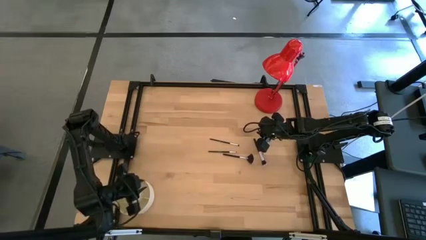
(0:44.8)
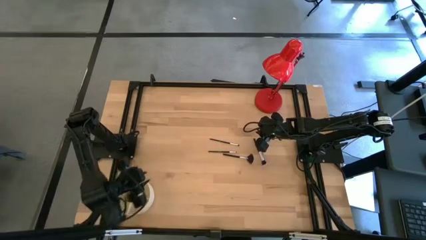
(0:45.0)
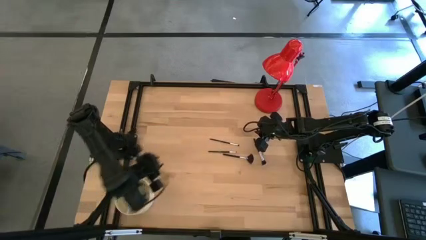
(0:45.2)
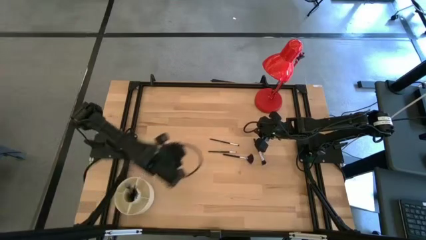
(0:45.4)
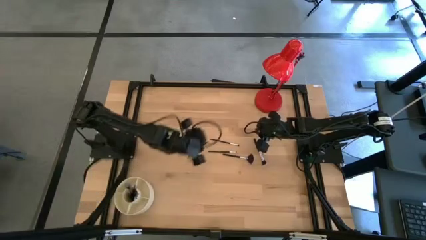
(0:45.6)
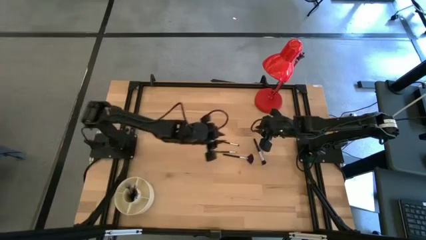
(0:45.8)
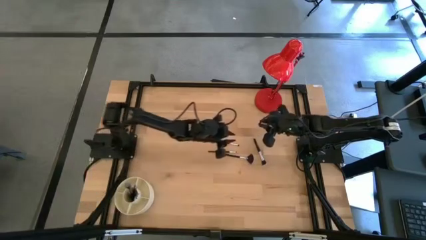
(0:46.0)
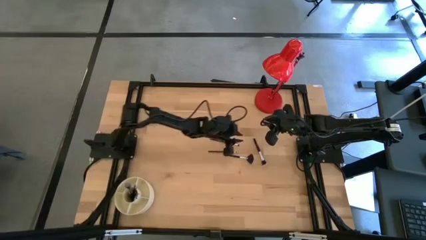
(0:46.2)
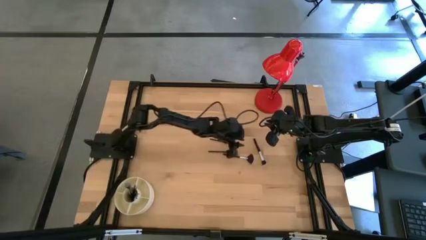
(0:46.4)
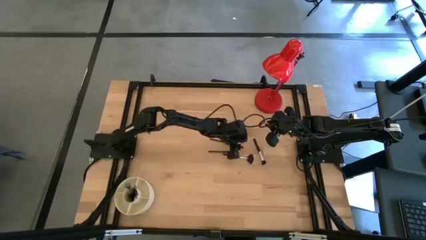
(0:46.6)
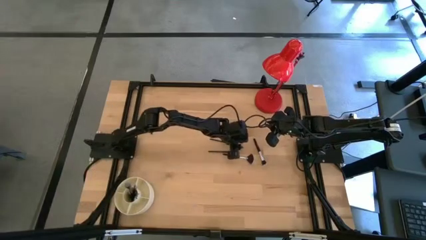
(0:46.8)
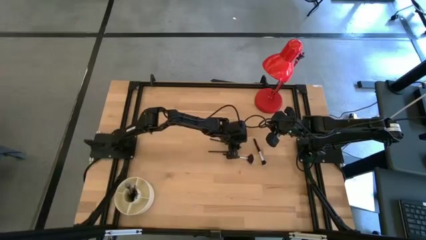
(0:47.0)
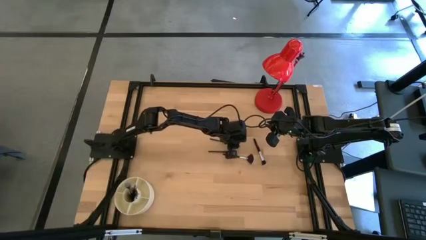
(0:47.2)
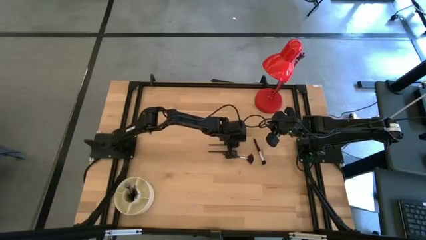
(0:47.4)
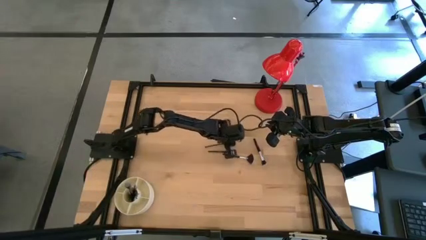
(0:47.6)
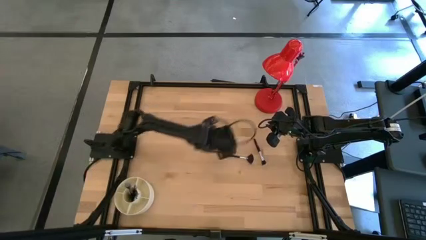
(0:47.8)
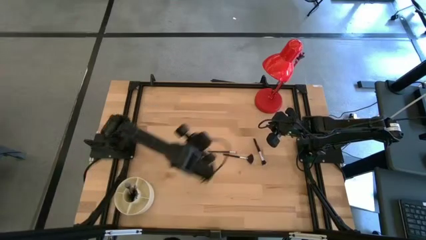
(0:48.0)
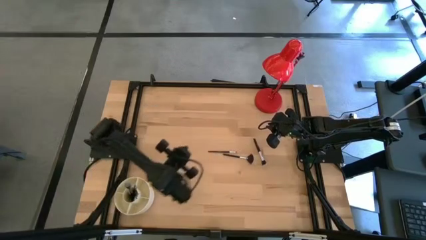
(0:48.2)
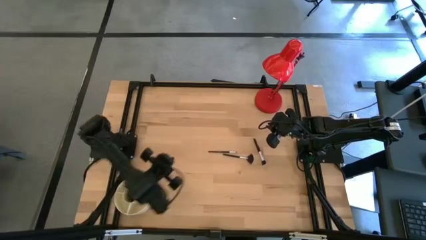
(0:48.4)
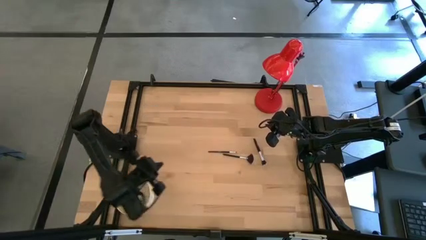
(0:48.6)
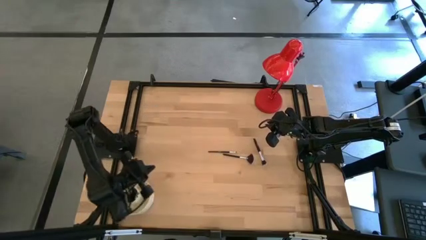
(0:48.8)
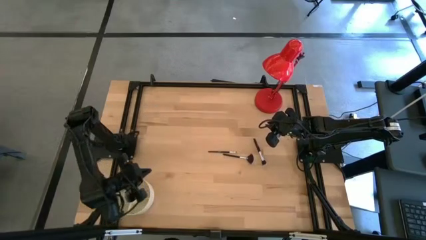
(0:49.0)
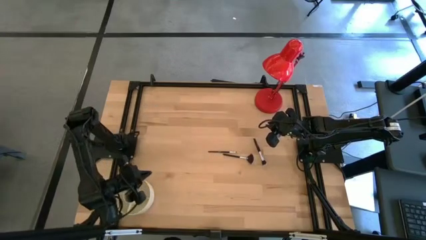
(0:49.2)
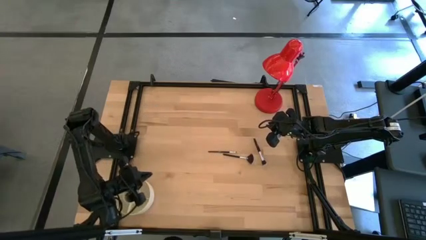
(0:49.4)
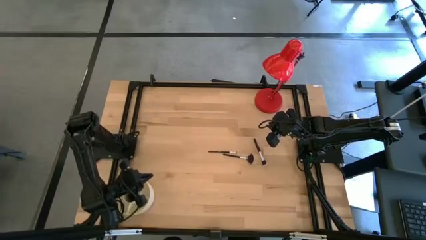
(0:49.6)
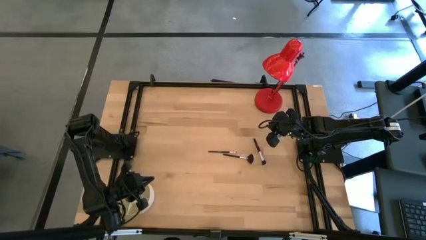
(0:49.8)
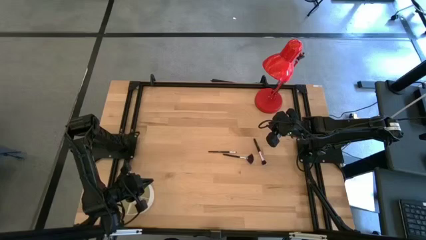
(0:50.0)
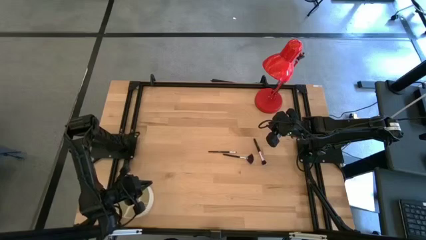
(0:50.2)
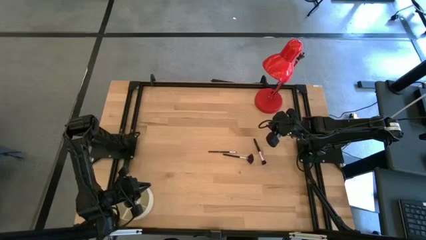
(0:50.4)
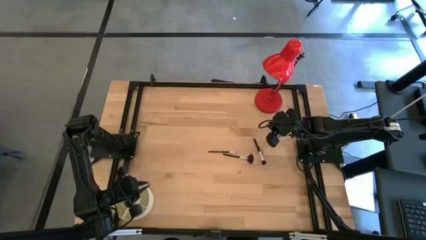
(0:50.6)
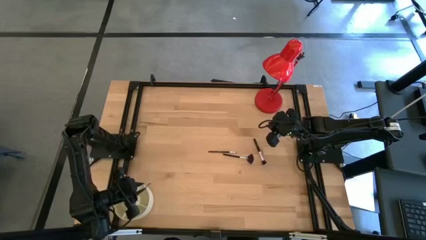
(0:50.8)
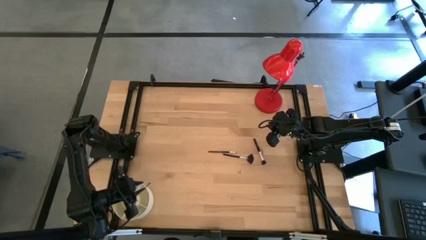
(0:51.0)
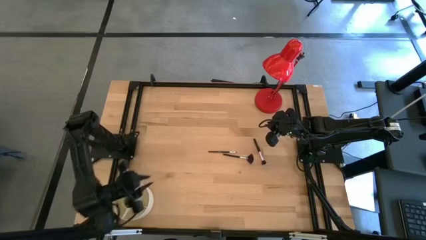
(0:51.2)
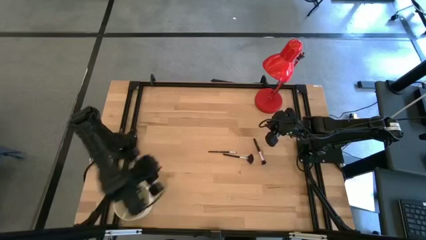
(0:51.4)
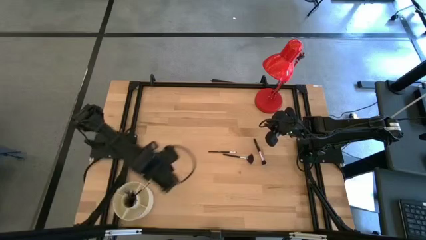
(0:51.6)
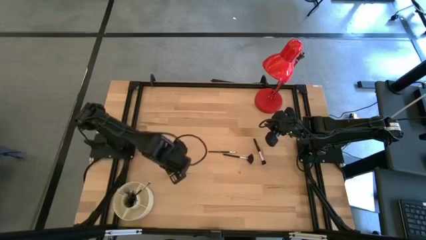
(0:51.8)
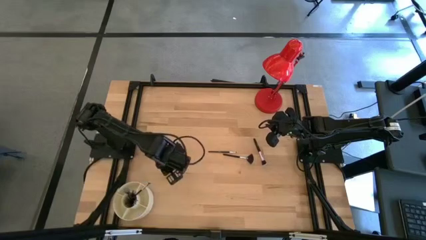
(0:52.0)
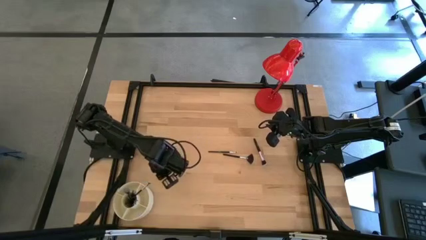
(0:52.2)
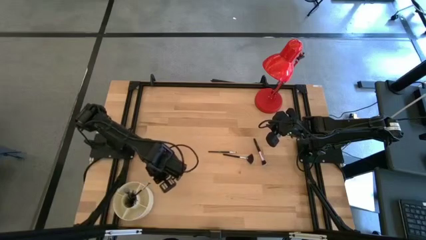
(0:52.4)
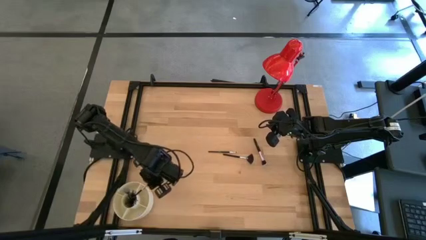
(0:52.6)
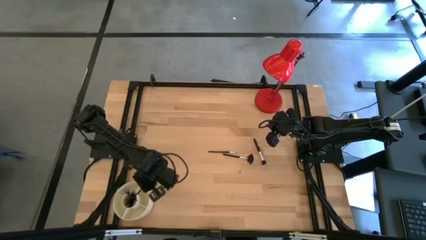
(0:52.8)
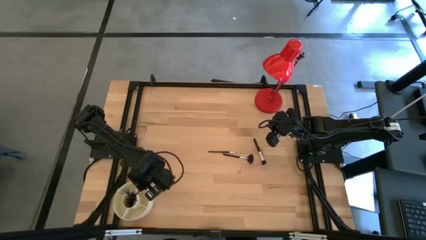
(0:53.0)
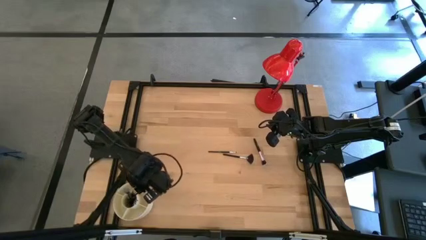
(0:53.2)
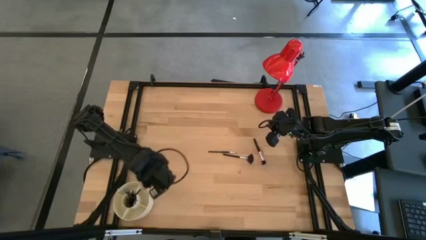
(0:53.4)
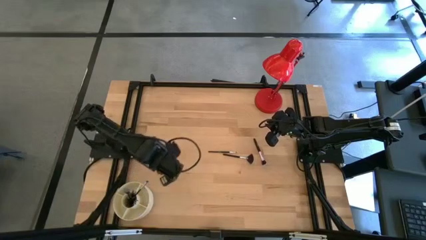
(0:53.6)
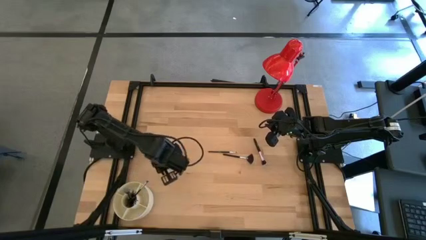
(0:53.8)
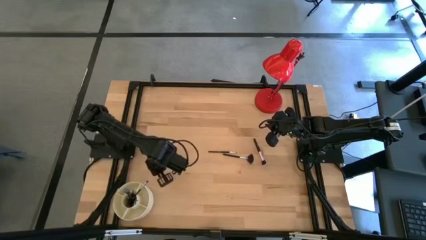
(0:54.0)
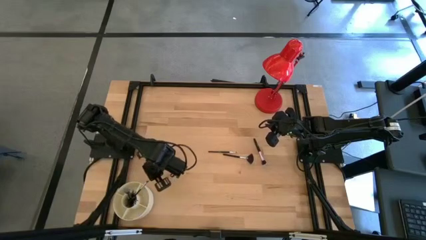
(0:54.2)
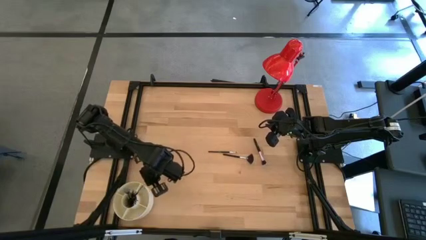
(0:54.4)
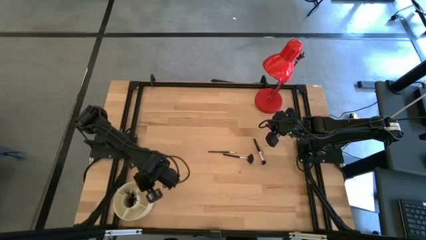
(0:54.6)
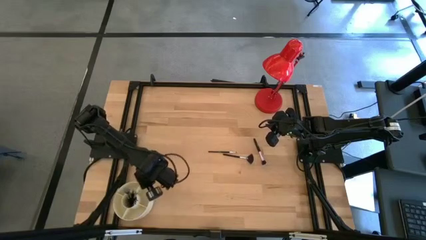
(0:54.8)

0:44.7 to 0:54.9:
Task: Pick & Place Makeup Brushes
Put the black eyeshadow brush into the makeup organizer

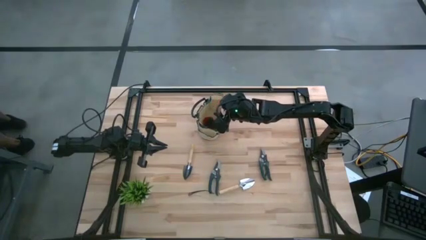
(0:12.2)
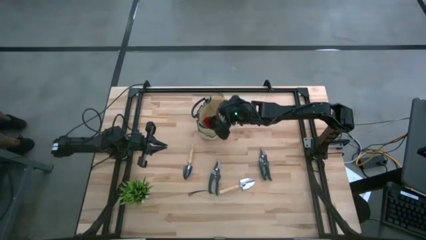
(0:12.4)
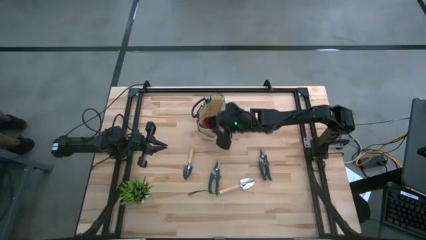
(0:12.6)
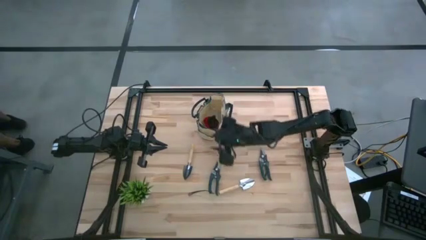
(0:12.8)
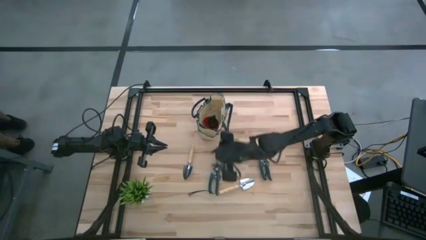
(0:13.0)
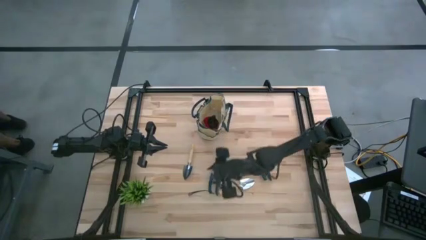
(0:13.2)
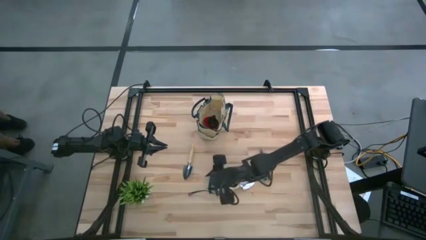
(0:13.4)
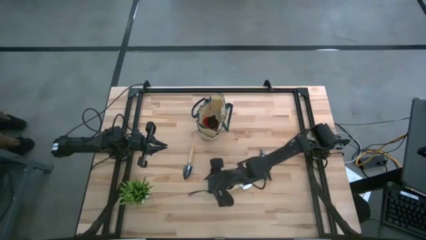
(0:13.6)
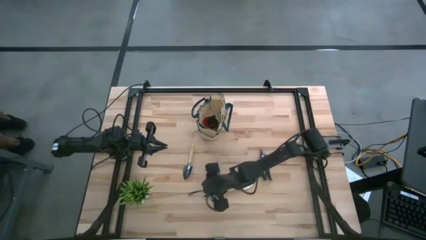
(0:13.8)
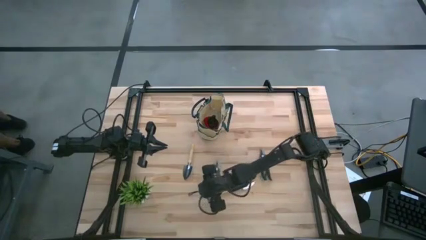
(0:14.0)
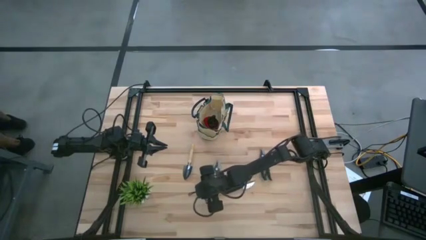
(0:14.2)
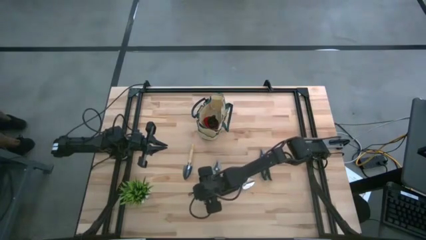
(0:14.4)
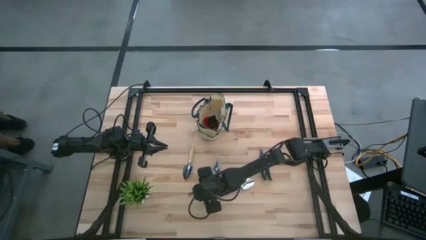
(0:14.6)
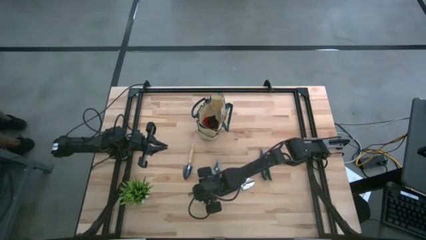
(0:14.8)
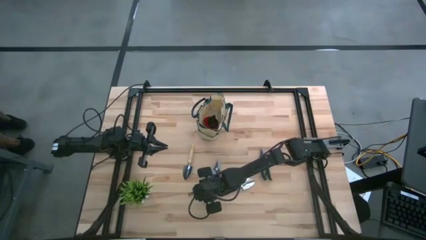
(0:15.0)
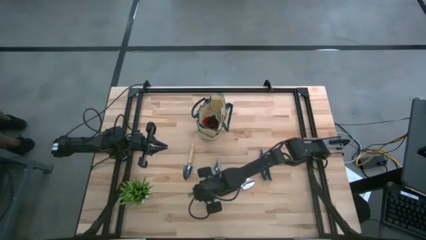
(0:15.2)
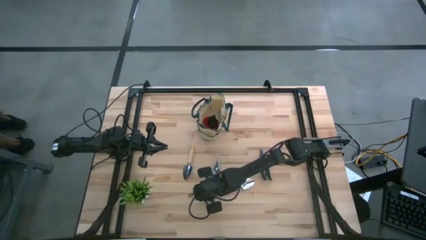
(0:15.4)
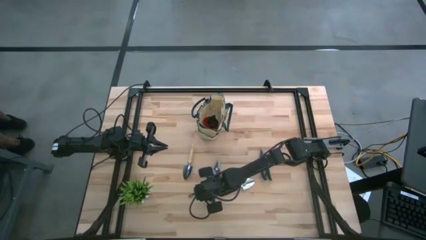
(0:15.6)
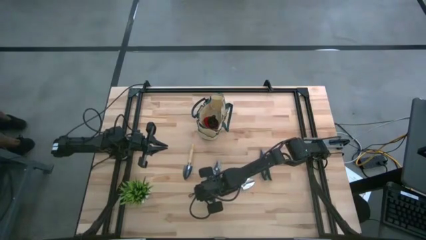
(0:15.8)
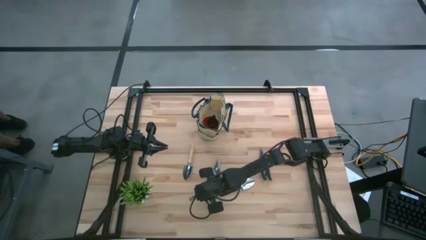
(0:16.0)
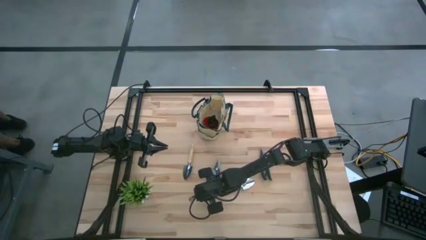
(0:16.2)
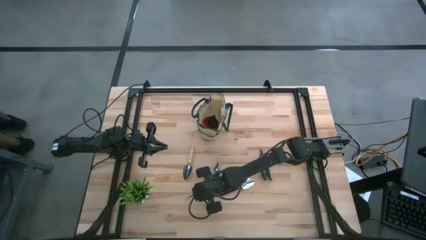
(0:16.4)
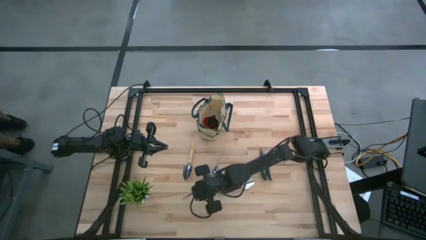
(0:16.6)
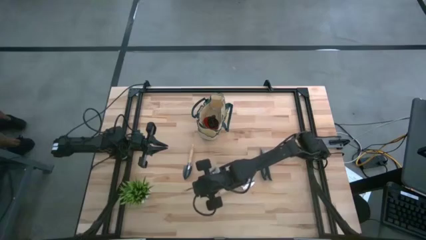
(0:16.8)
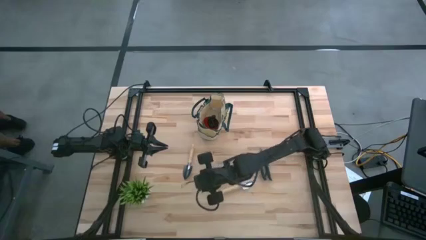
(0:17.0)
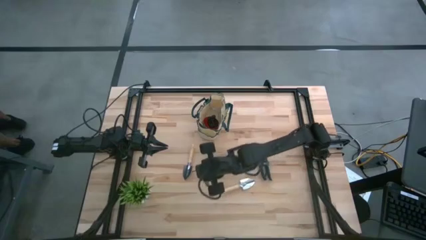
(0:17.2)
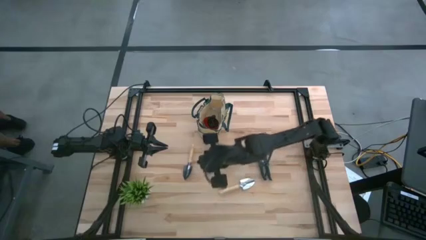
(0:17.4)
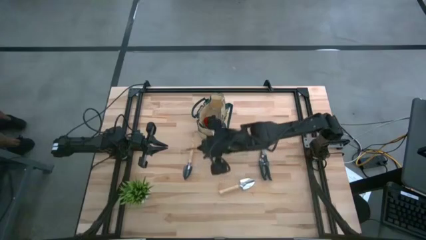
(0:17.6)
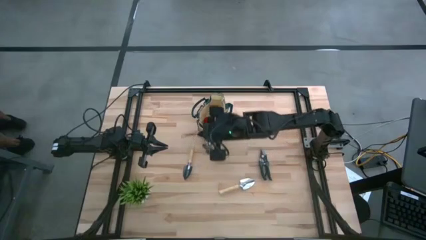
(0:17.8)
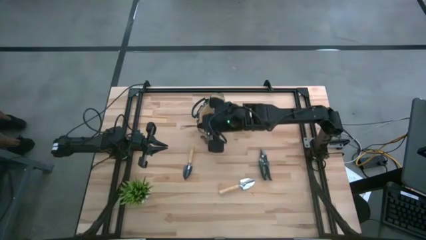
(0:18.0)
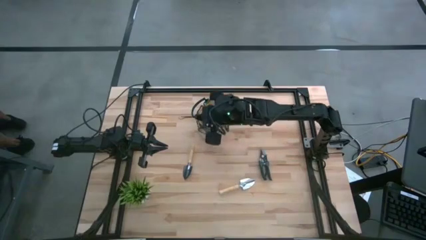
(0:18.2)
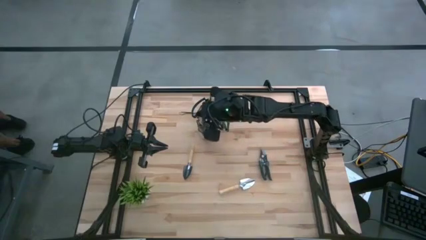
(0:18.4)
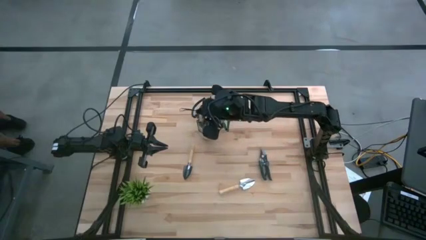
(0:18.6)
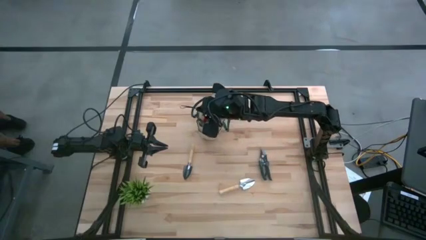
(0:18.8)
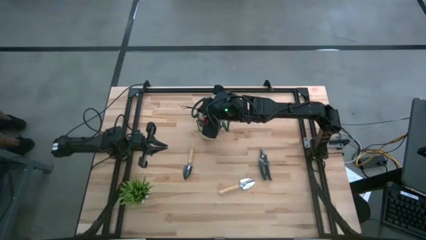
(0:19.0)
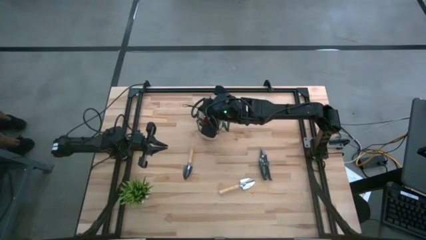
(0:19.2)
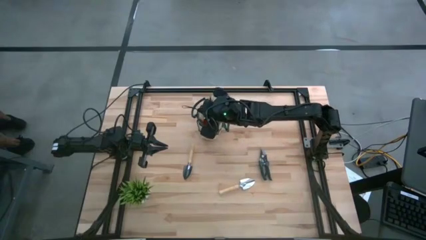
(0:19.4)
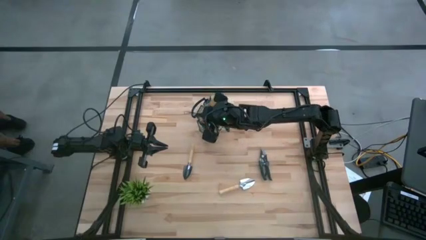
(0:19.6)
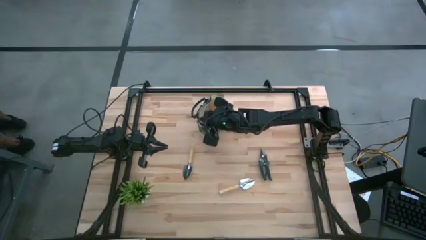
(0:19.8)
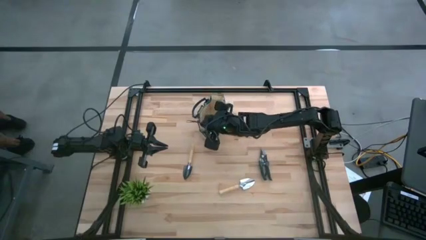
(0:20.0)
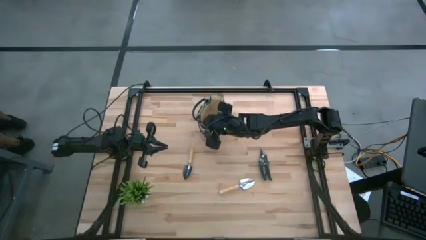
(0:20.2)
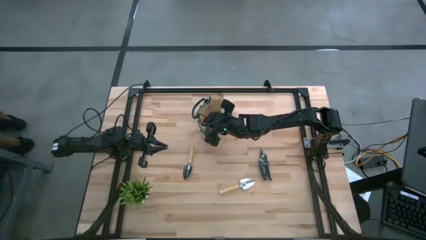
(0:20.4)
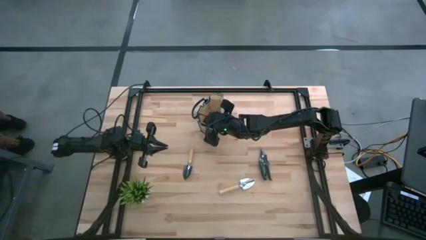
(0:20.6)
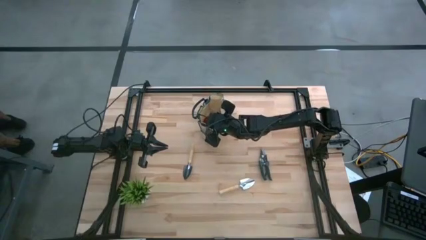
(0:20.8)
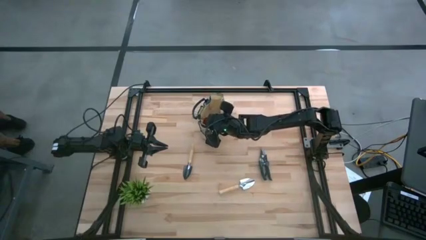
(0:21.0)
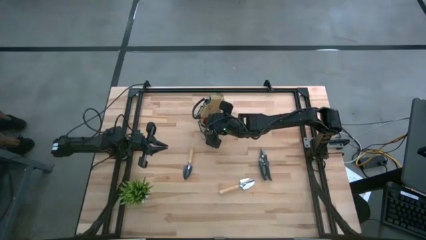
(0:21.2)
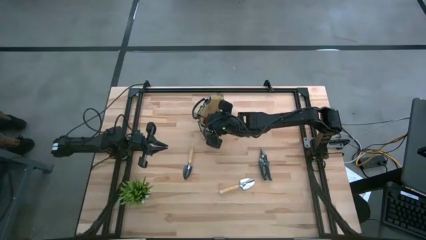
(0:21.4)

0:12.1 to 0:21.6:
Task: Pick & Place Garden tools in Gardening bag
Put the left shear scissors into the gardening bag
